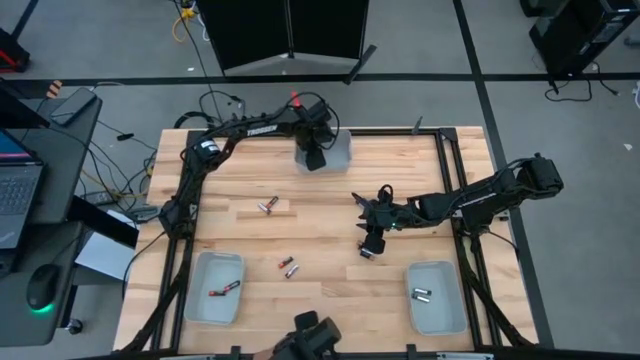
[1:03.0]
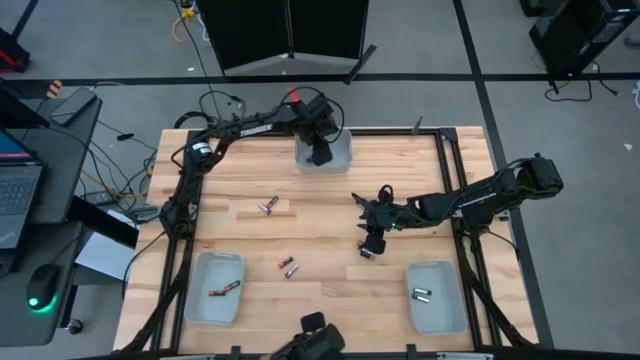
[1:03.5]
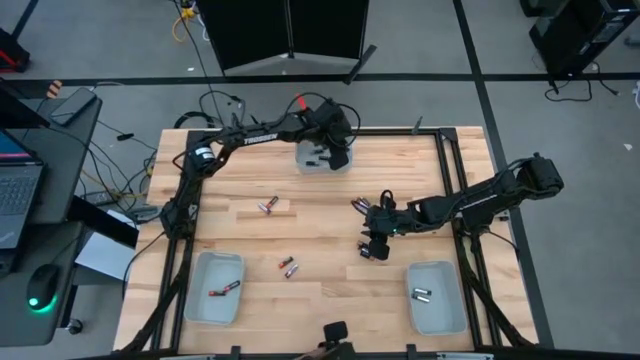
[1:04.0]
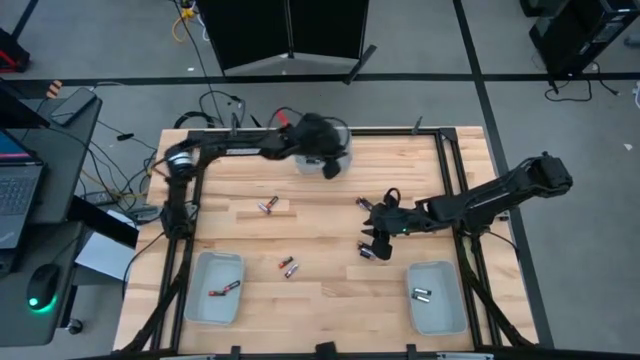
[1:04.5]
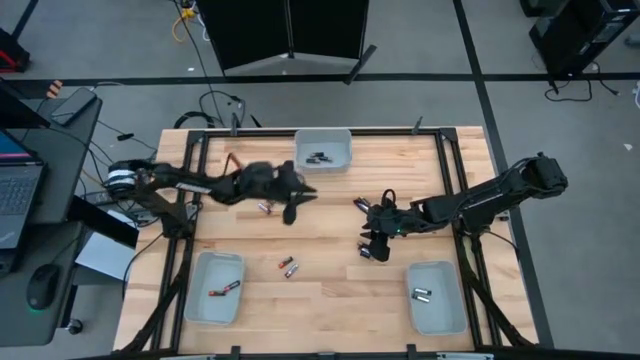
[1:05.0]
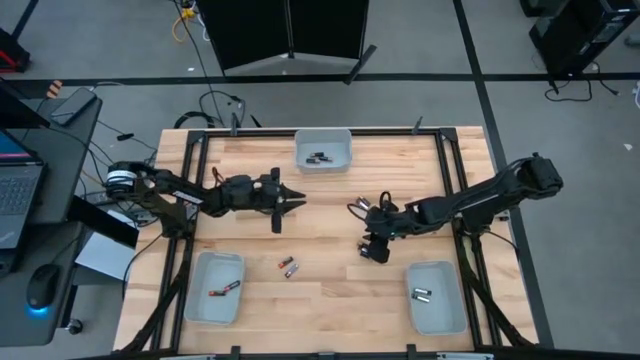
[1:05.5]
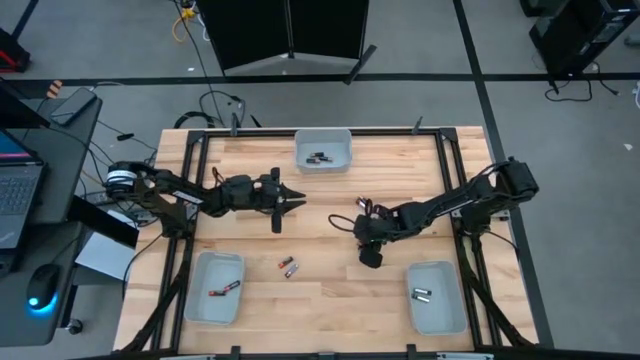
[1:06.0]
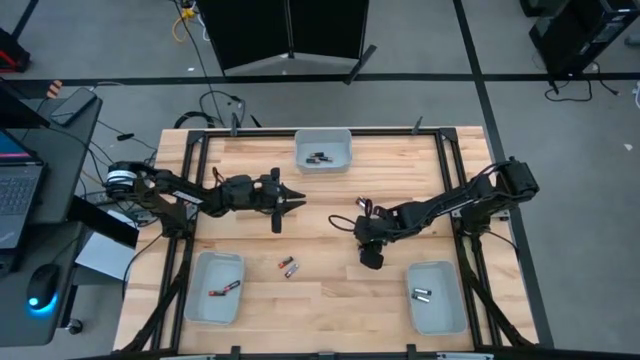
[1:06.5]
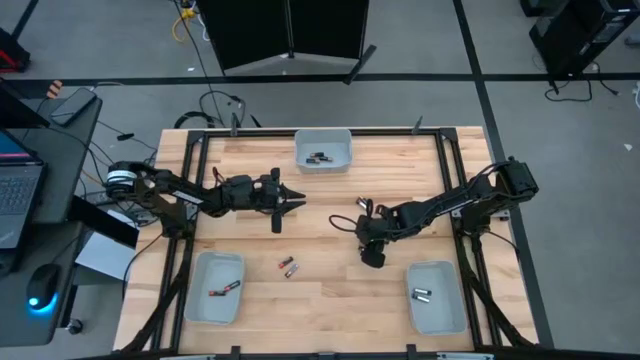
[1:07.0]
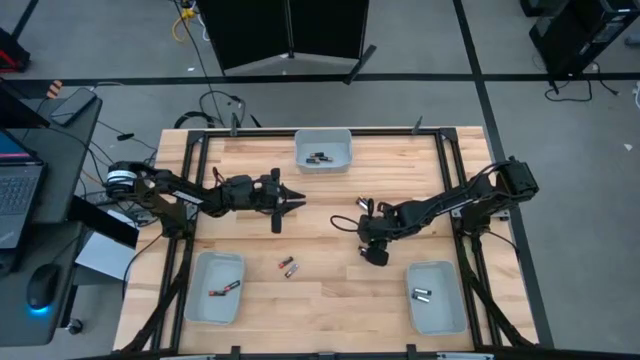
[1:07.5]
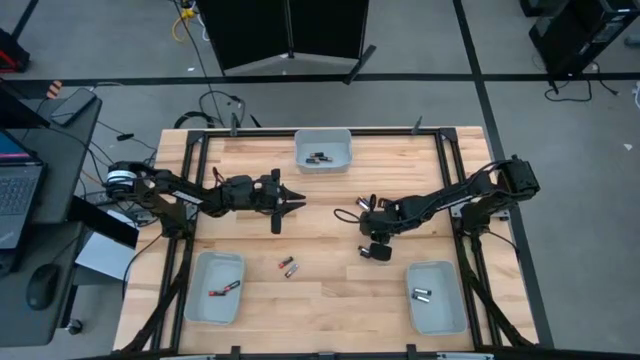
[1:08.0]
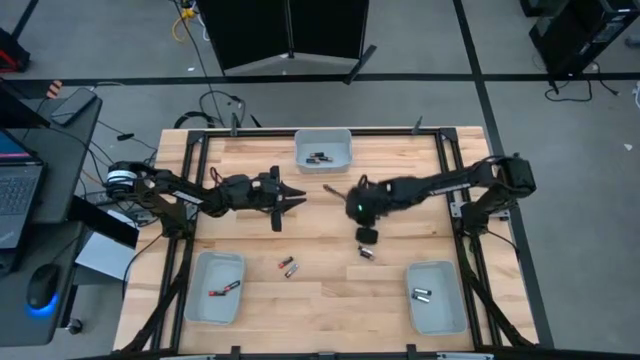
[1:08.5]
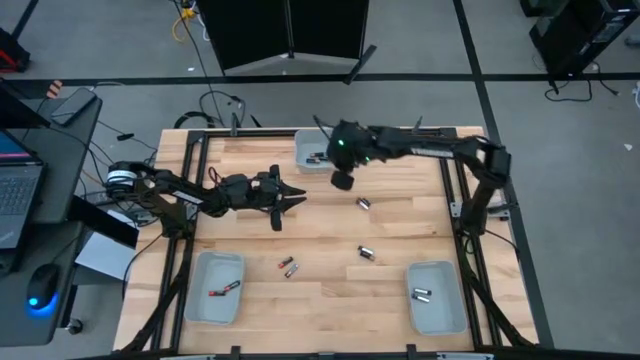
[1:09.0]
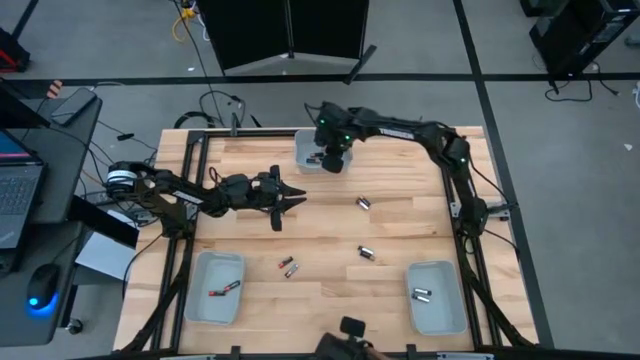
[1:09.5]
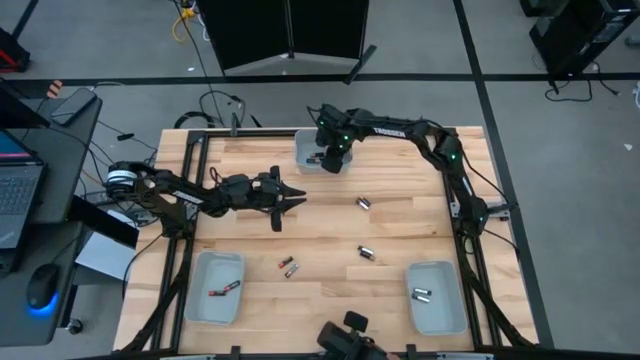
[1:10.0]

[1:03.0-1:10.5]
Task: Sort batteries
Put the copper battery into the top gray bin

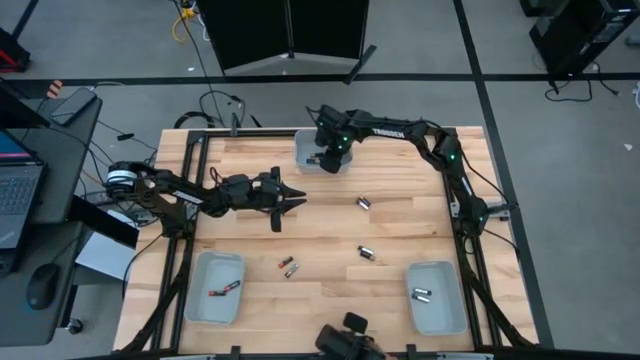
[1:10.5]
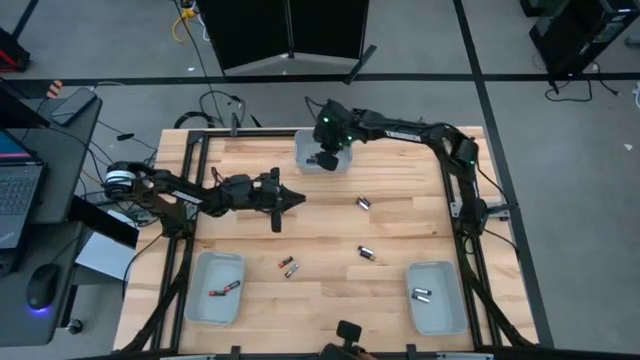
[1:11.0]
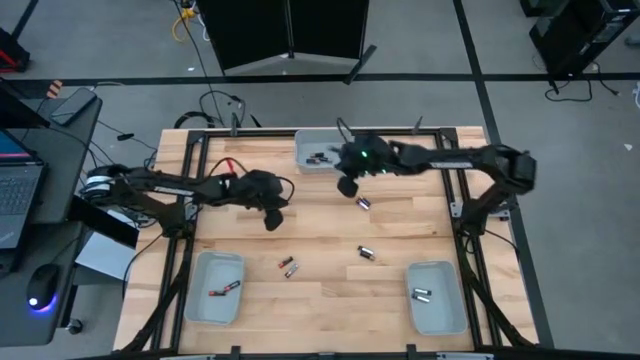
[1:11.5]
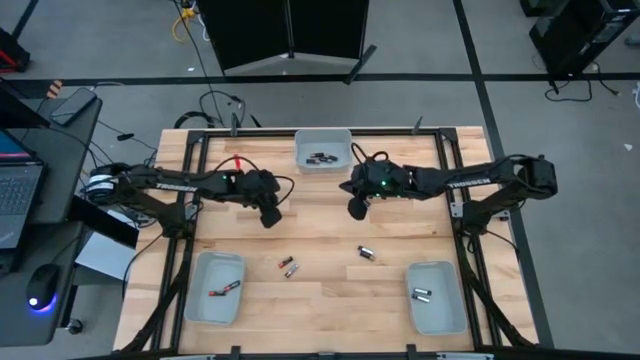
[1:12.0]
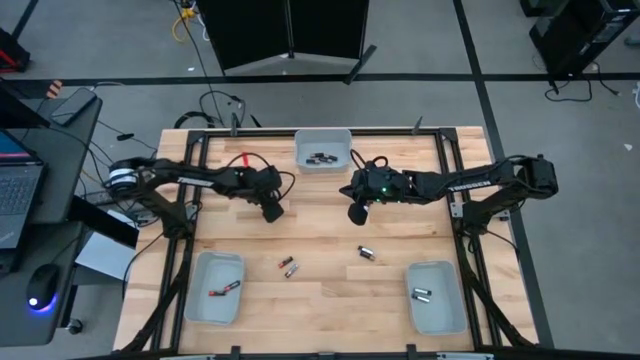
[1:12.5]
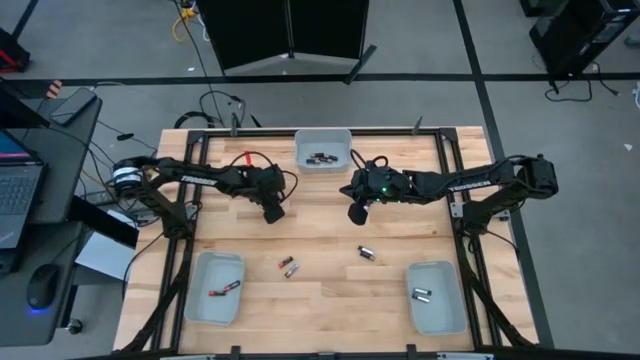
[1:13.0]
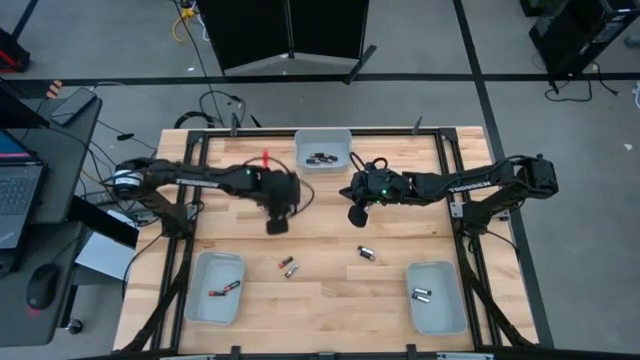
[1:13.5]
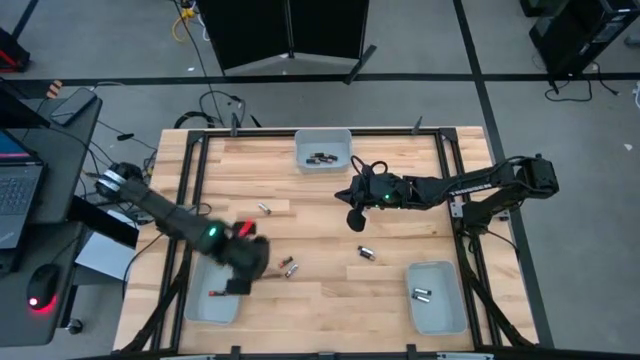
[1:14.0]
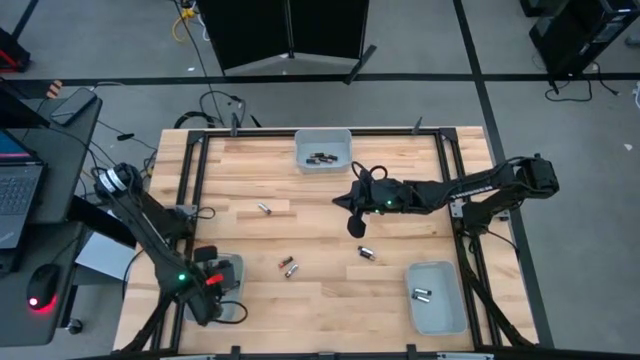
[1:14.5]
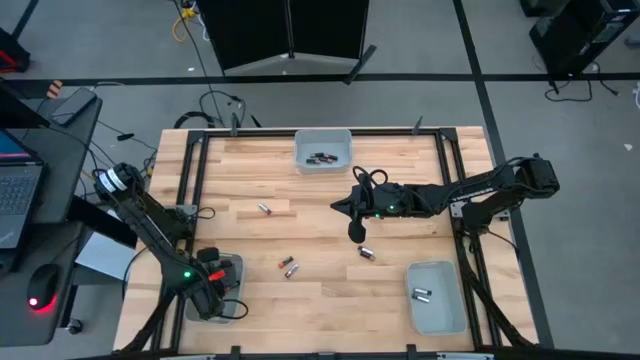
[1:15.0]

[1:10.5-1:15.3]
Put the red battery into the bottom left gray bin

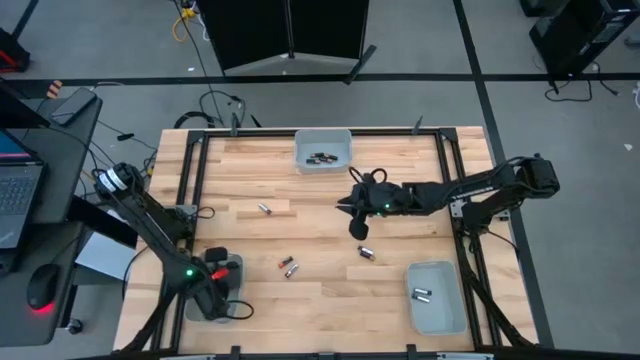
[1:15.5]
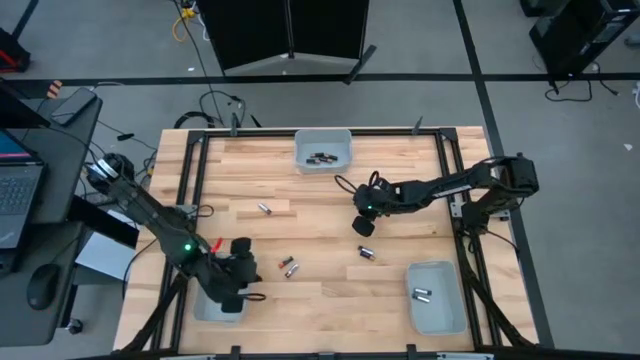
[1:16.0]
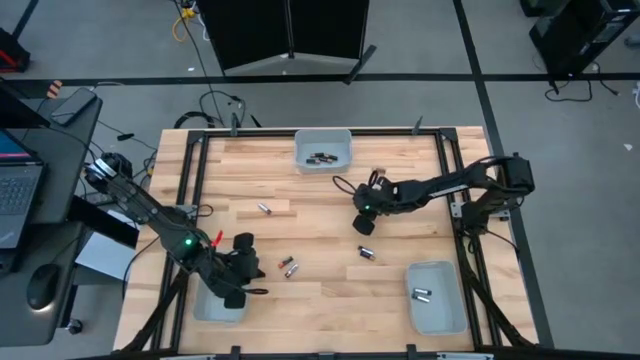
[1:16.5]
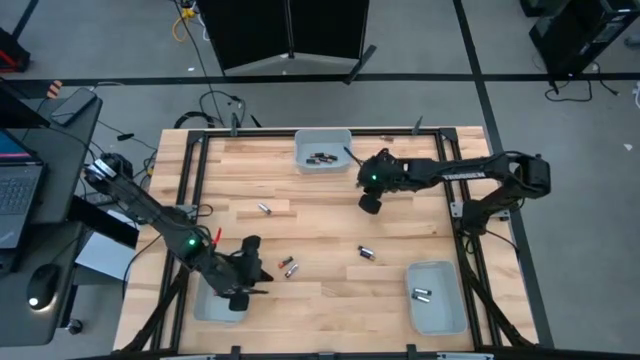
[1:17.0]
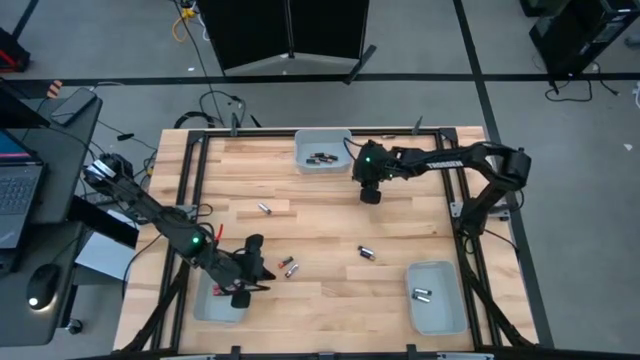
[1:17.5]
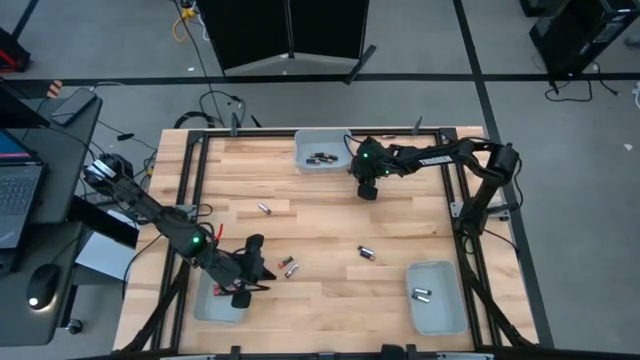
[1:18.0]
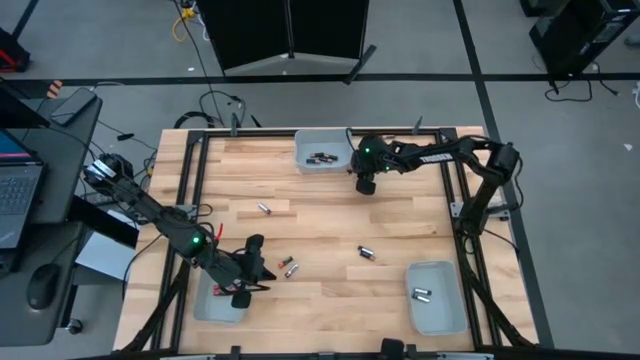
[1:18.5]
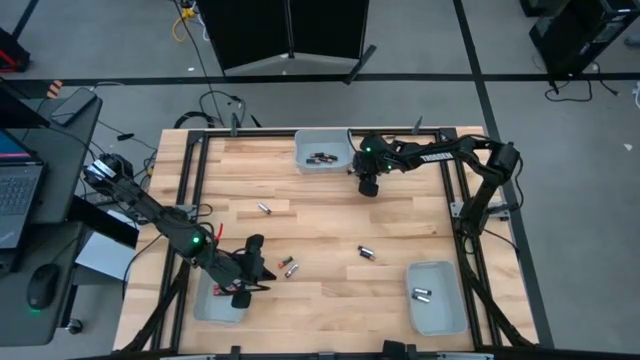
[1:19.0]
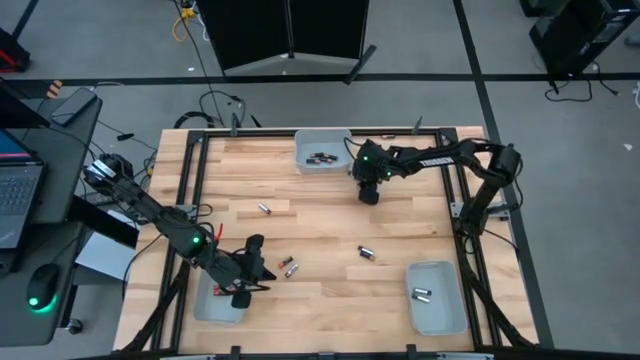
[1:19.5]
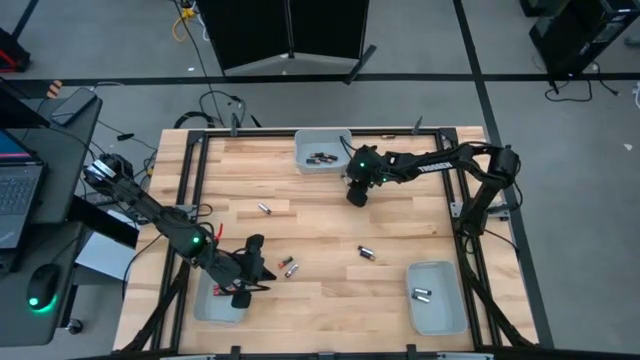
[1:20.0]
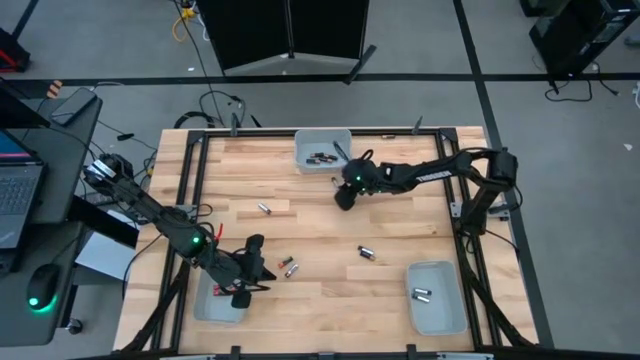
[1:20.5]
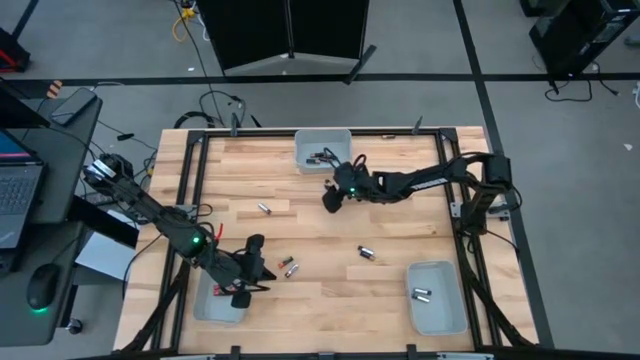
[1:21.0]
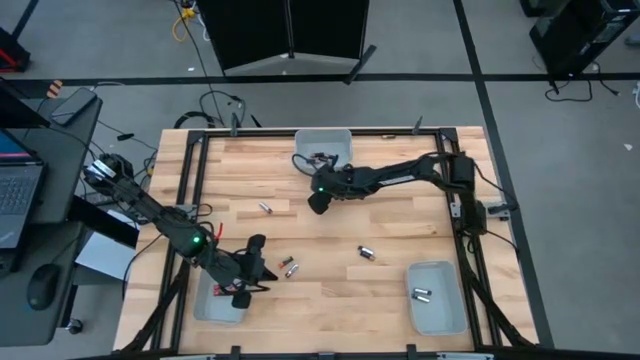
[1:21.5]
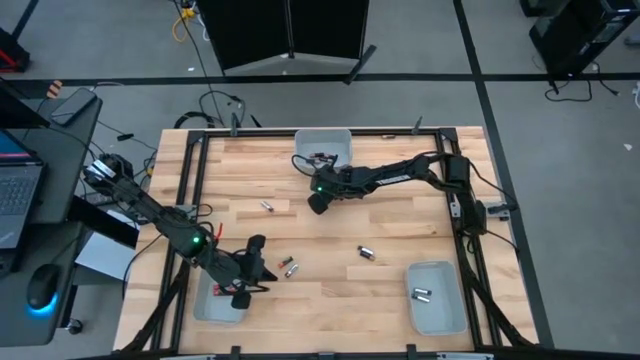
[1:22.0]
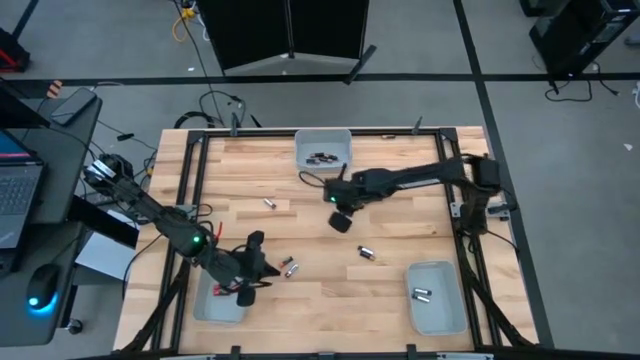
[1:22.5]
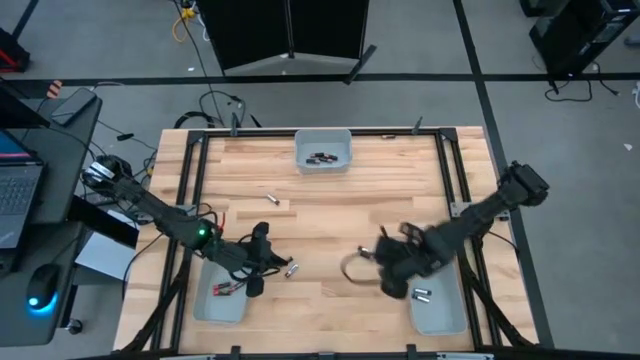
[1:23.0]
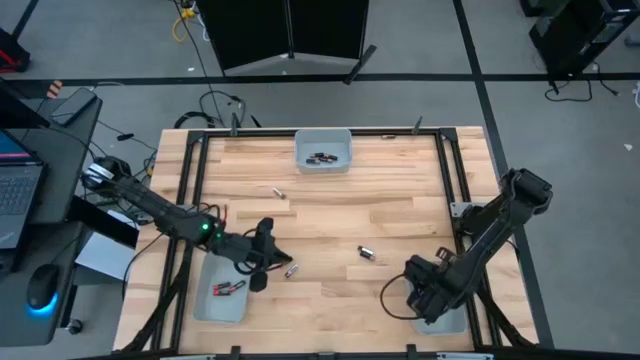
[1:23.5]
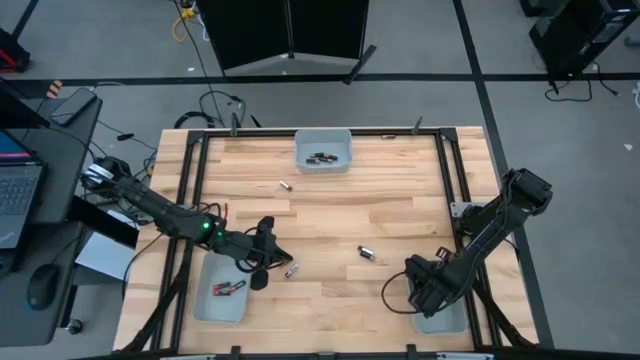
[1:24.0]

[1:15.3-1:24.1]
Put the silver battery into the bottom right gray bin
